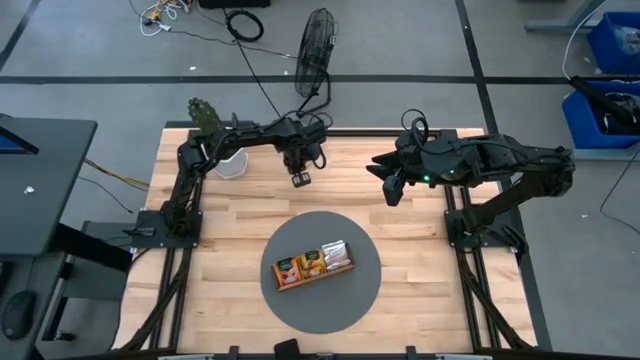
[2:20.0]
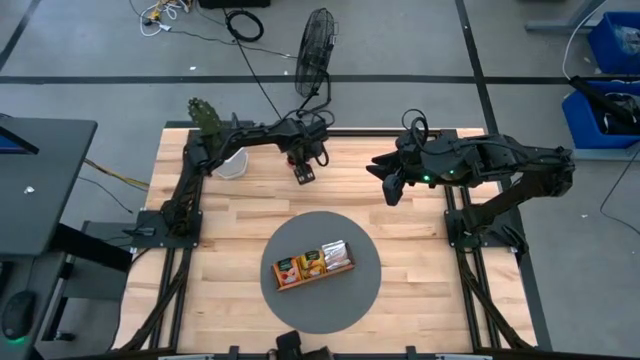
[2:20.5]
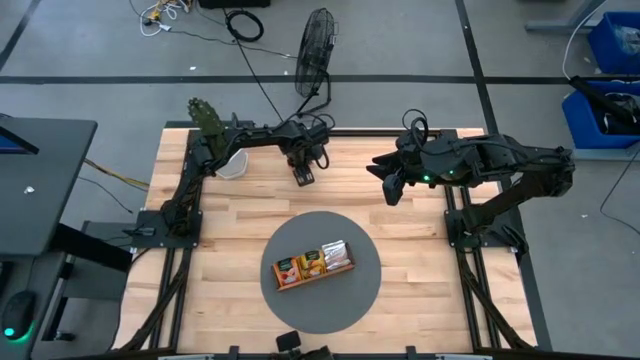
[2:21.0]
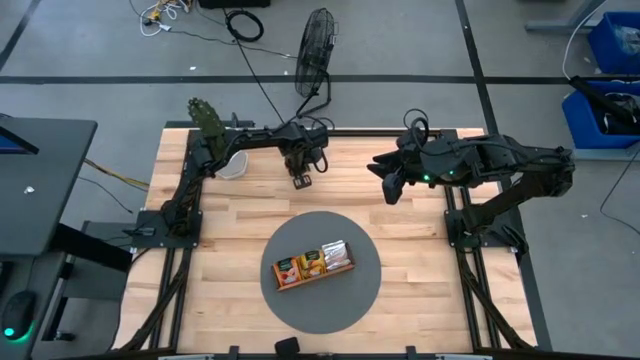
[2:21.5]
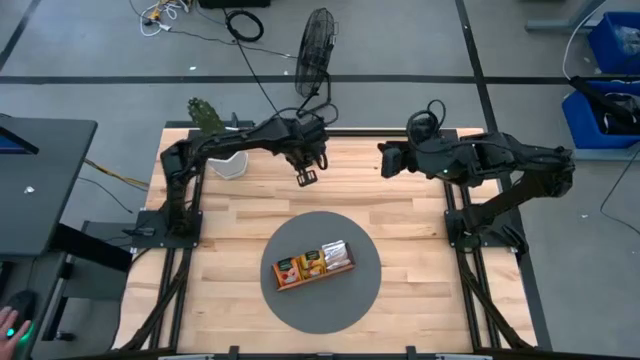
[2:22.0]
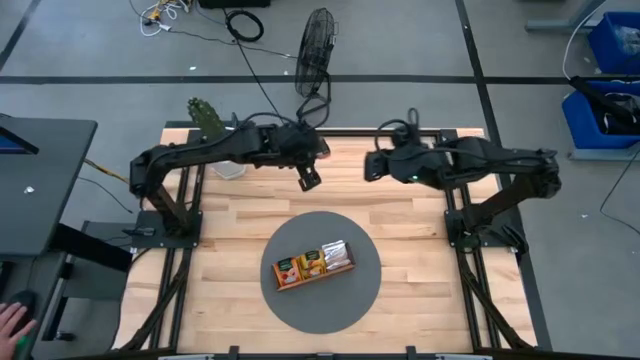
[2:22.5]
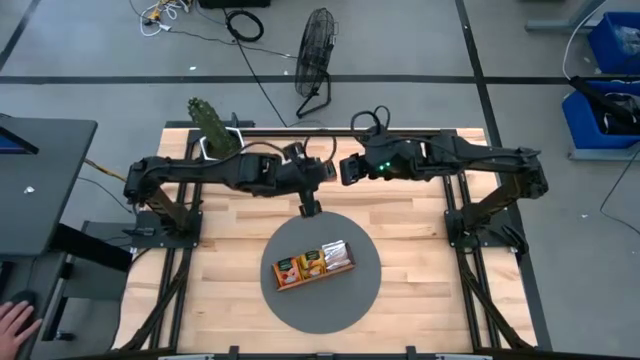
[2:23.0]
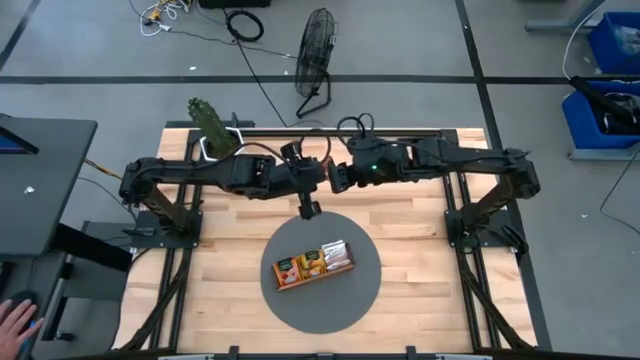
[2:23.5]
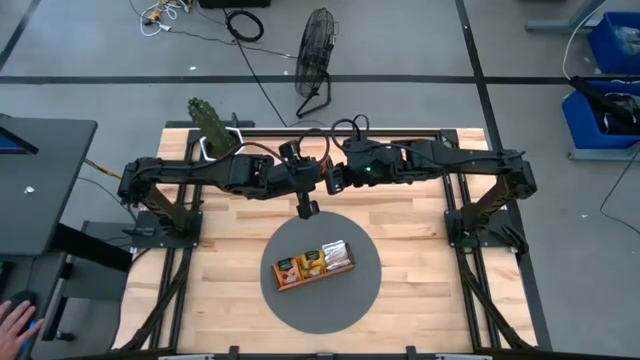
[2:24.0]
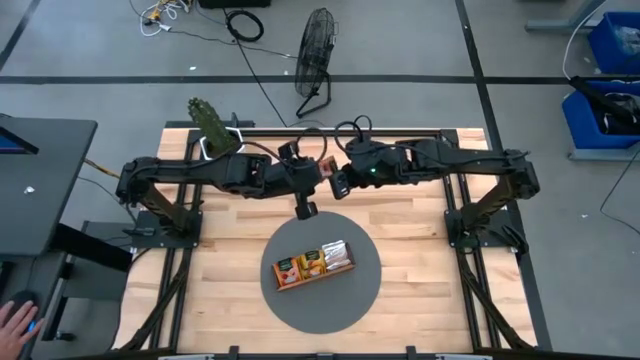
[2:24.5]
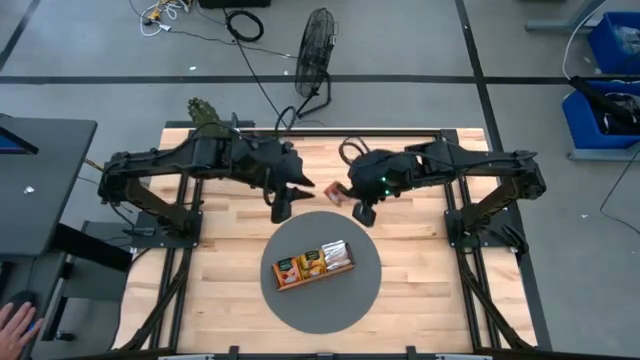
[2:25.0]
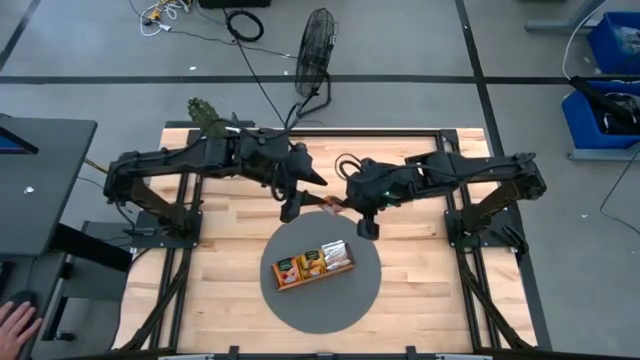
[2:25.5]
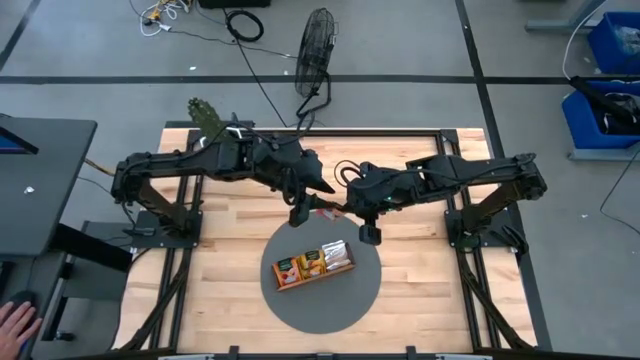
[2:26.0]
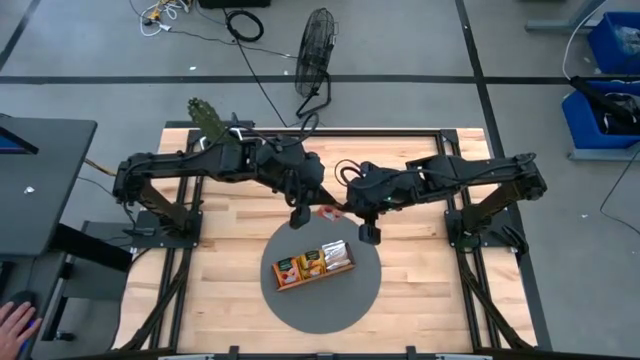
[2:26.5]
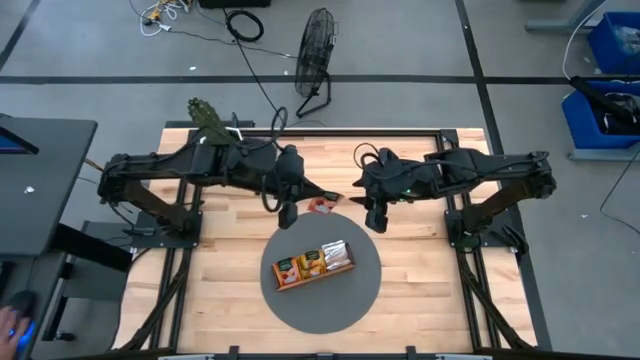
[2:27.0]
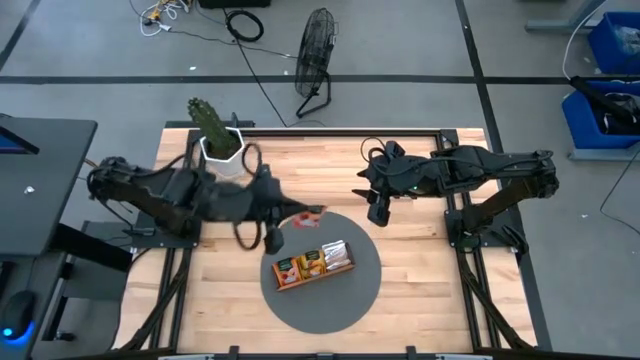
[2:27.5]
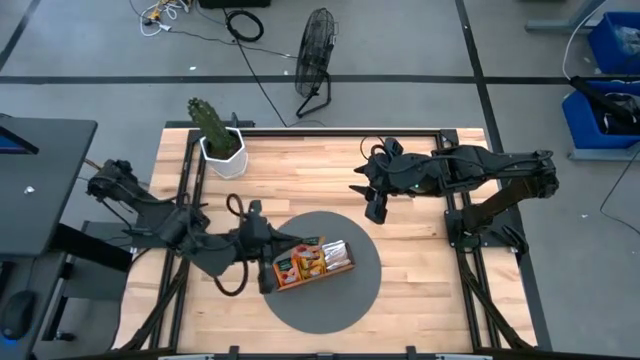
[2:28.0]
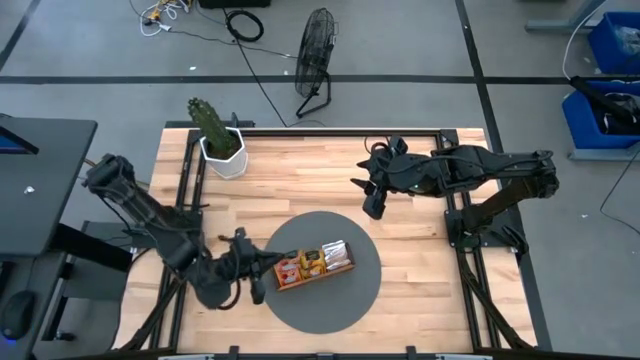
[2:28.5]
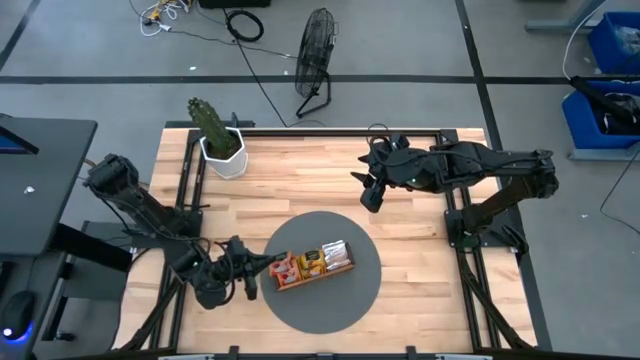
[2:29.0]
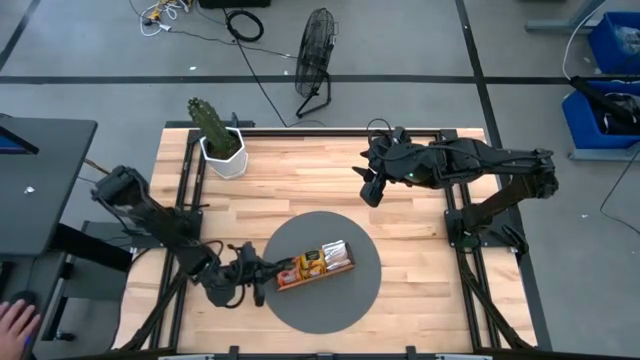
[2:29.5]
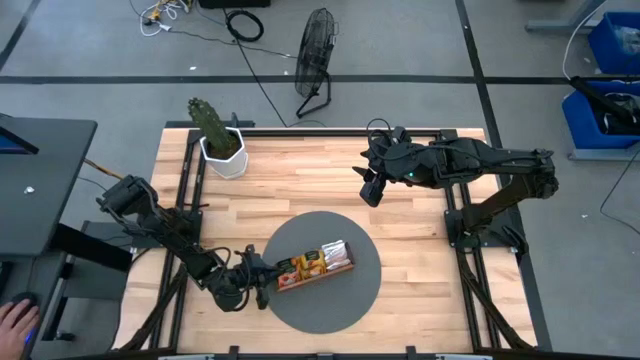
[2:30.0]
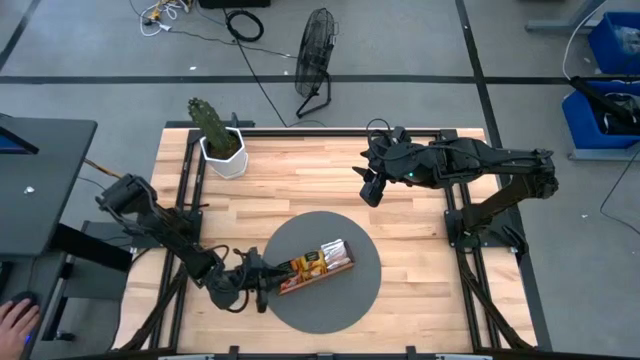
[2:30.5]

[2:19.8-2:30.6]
Task: Pick & Place Tea
Put the orange tea bag into the left section of the wooden organizer

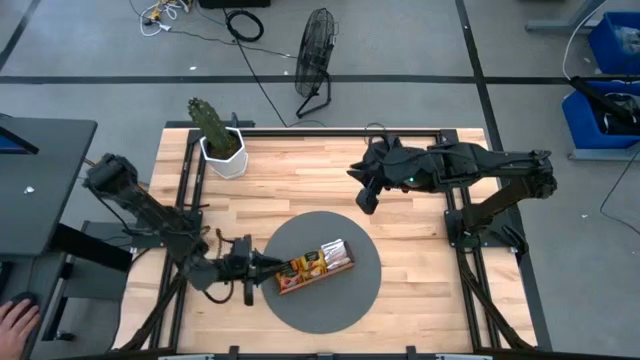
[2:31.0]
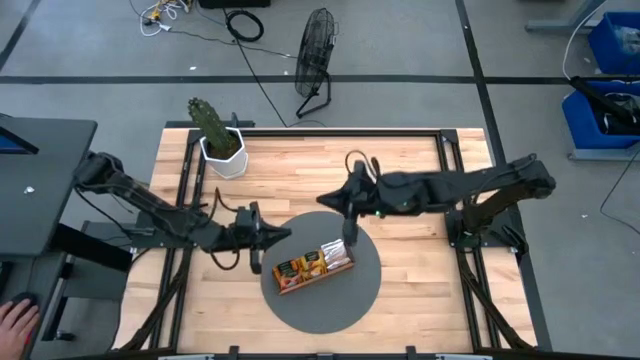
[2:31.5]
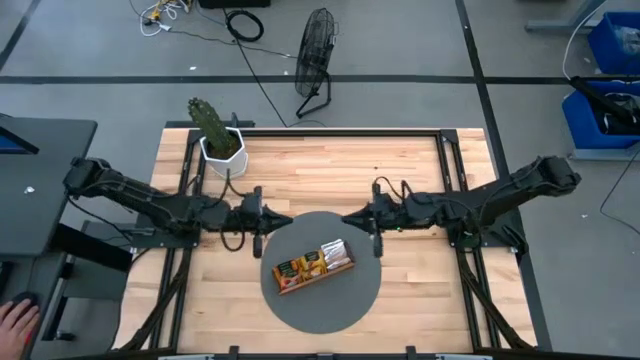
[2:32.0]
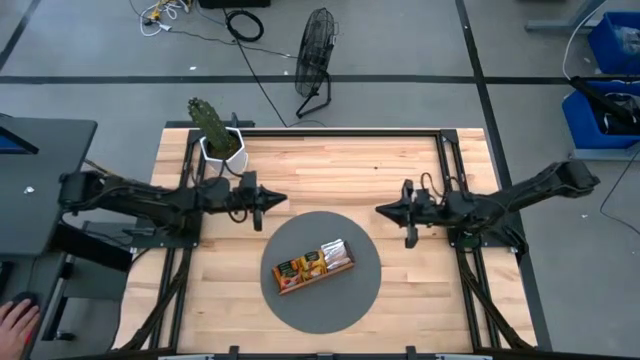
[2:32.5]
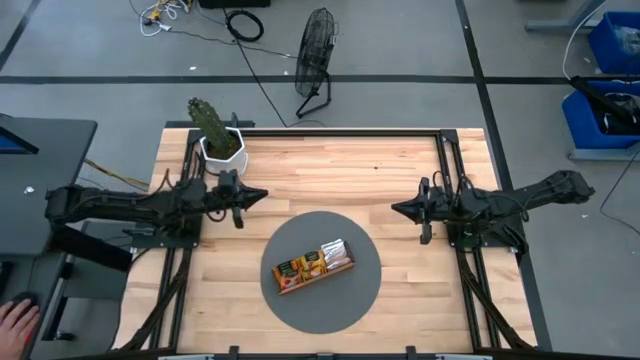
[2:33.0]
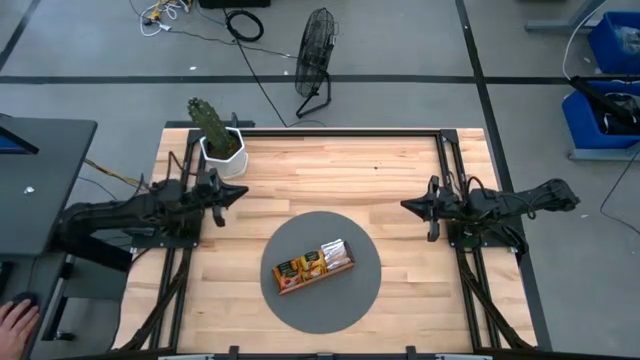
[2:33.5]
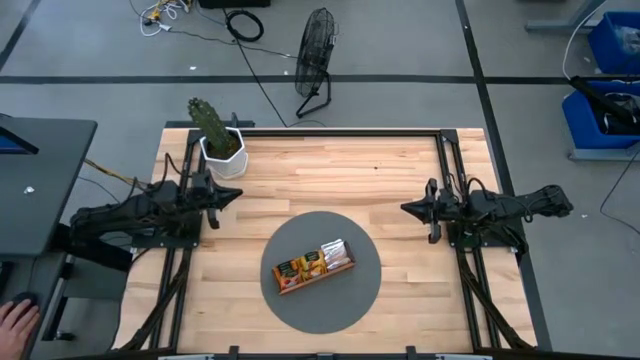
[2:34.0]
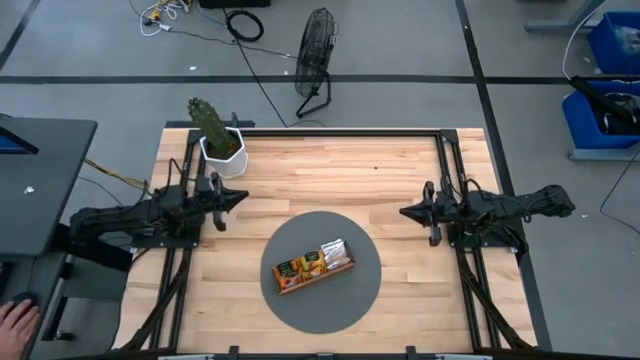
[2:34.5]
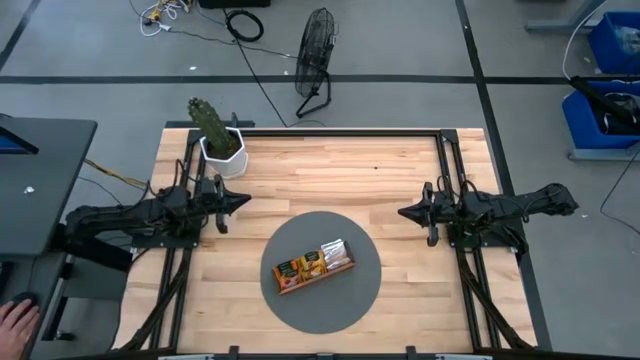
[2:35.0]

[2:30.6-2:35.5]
Return to Home Position

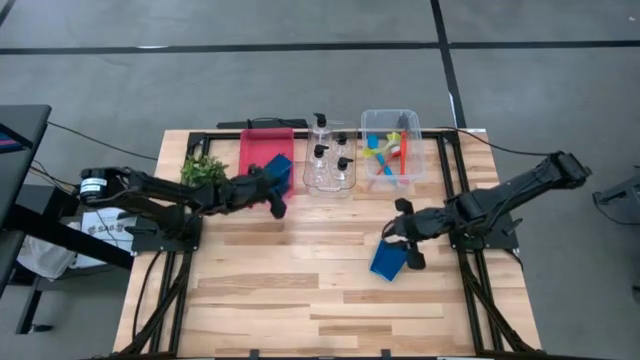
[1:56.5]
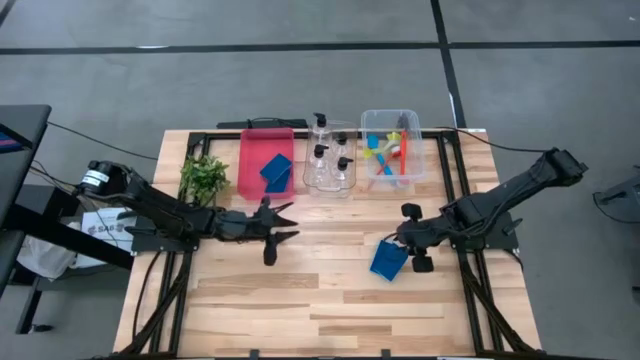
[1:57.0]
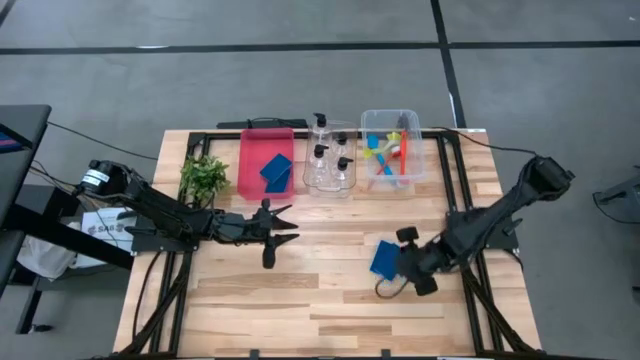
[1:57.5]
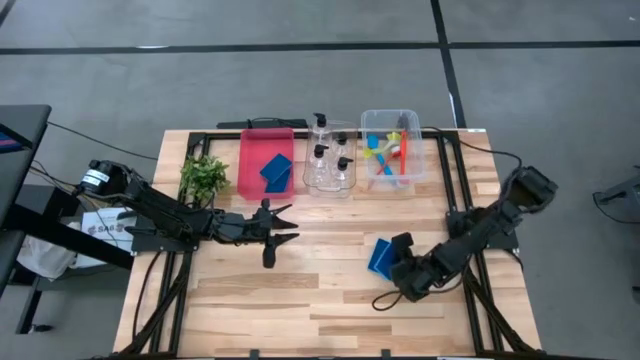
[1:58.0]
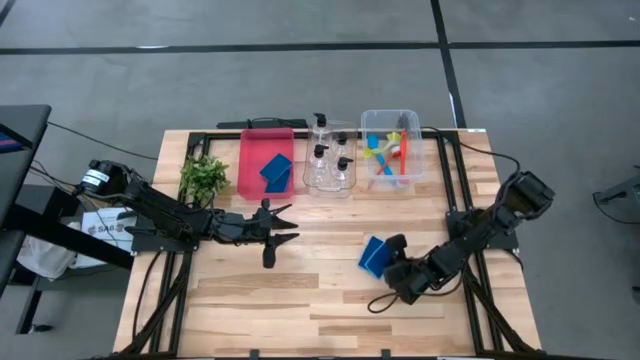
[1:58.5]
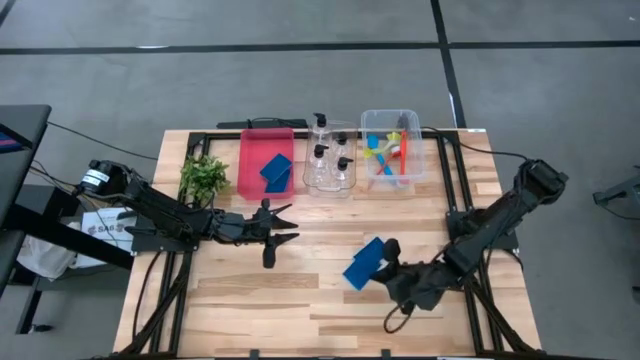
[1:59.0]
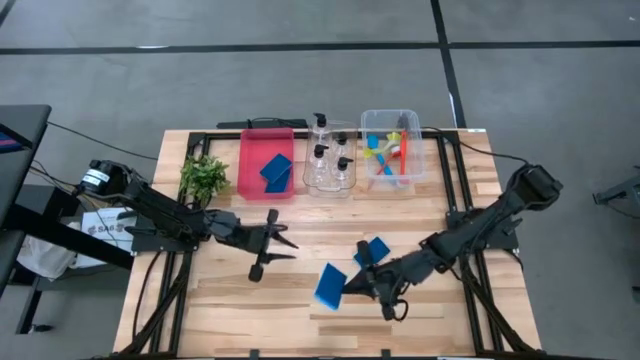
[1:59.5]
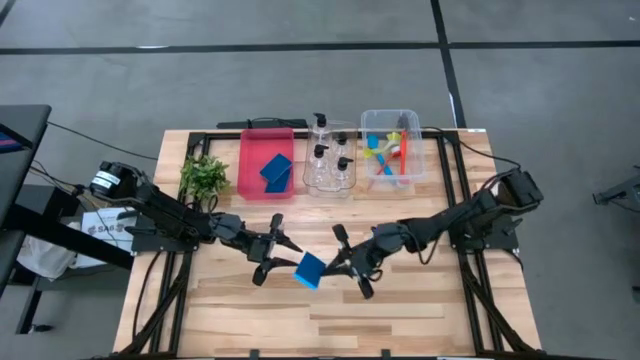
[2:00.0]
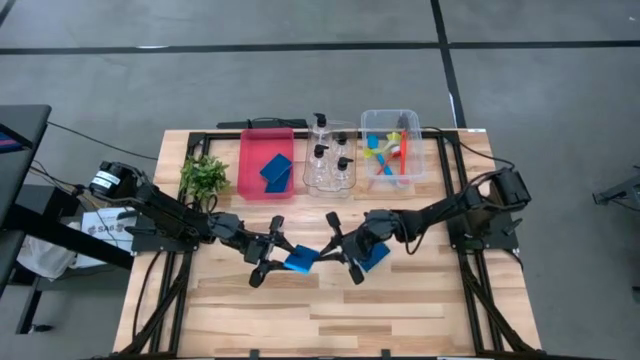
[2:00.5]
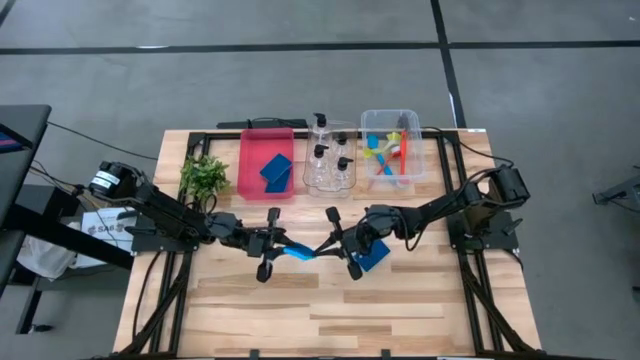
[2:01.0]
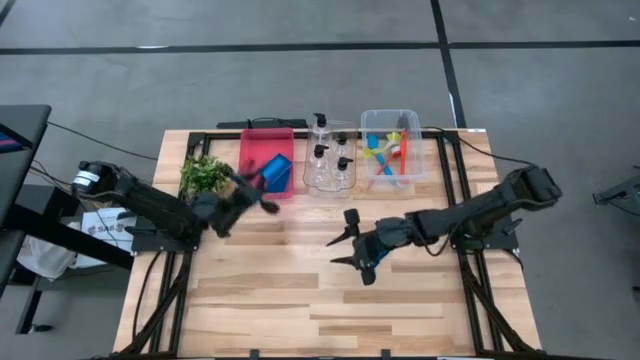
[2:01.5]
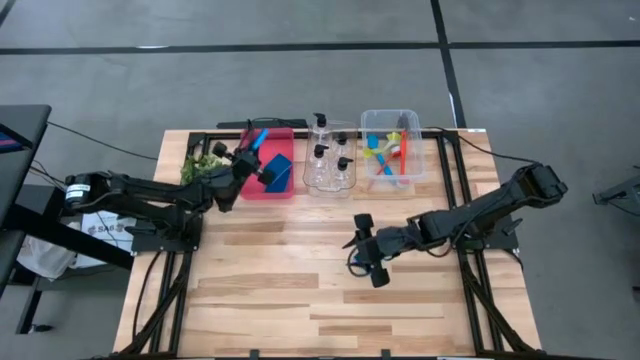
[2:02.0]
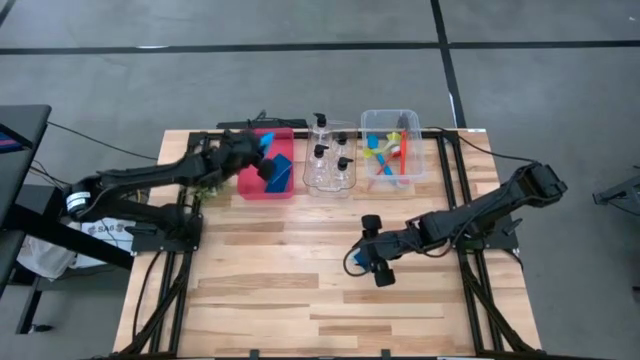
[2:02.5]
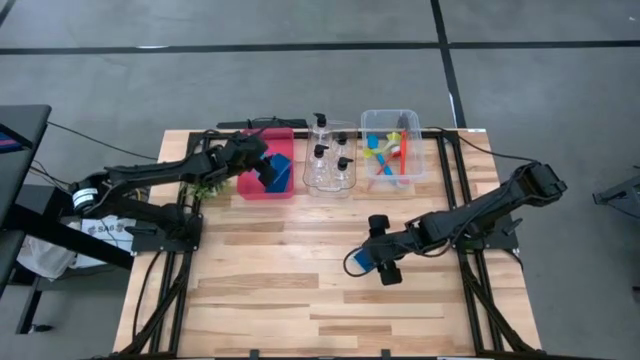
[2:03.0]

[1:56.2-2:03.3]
Task: Pick & Place Kitchen Sink Supplies
Put the blue sponge wipe into the red transparent bin

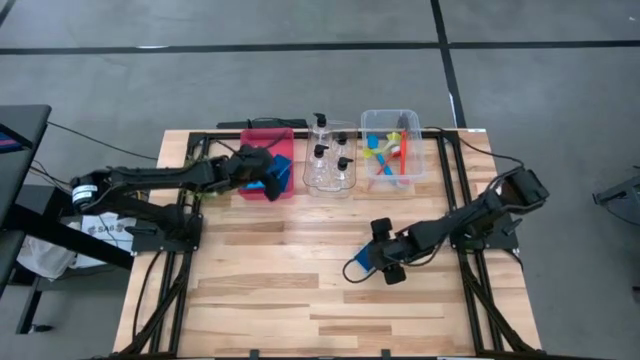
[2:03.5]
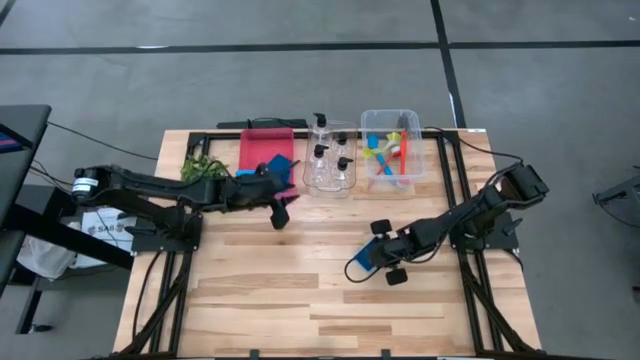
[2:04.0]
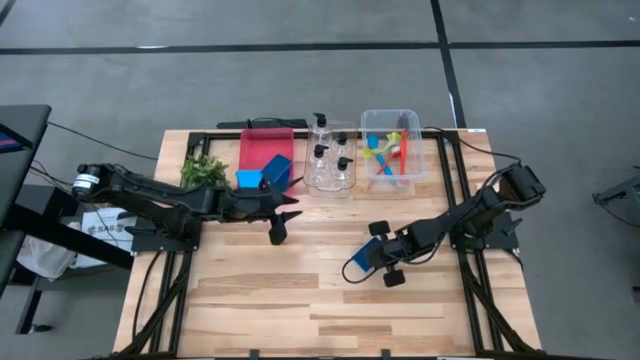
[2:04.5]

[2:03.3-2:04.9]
Put the blue sponge wipe into the red transparent bin
